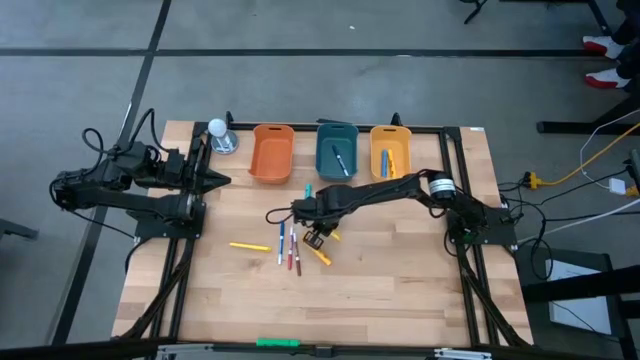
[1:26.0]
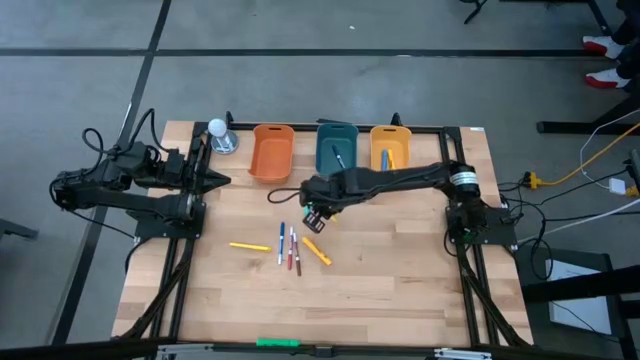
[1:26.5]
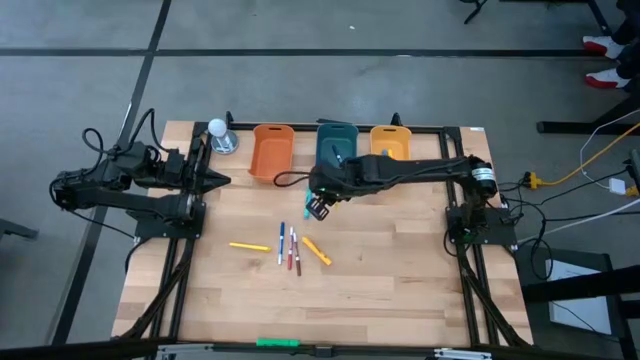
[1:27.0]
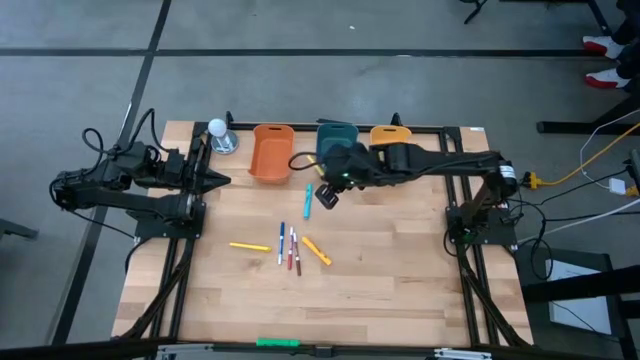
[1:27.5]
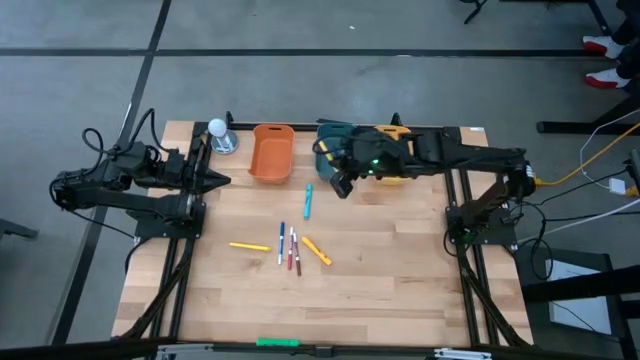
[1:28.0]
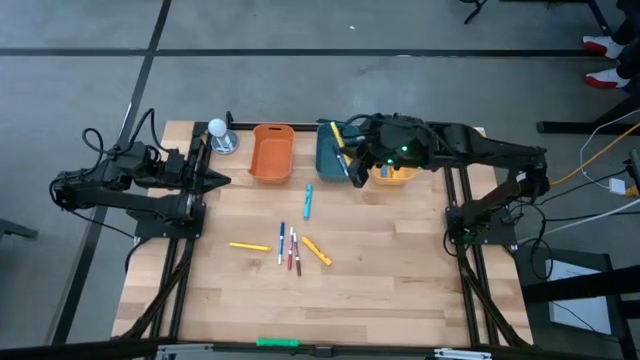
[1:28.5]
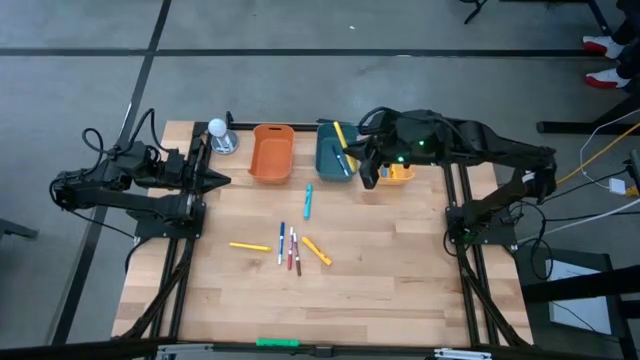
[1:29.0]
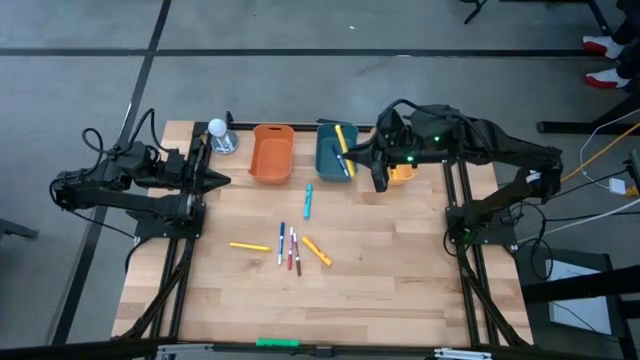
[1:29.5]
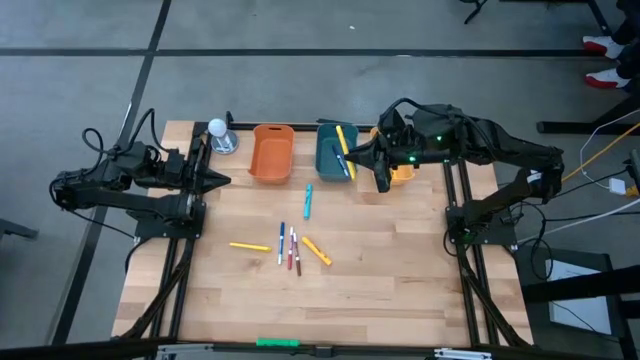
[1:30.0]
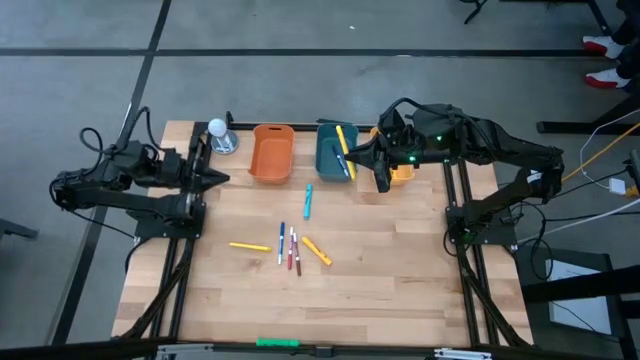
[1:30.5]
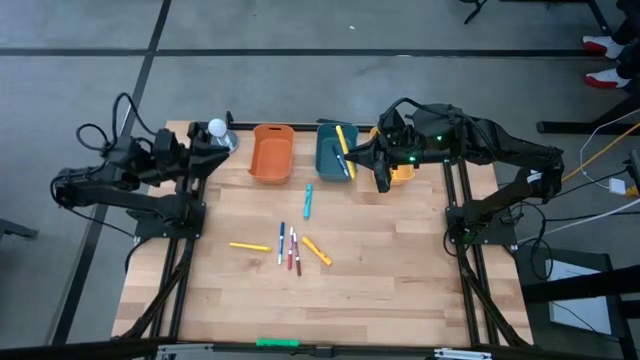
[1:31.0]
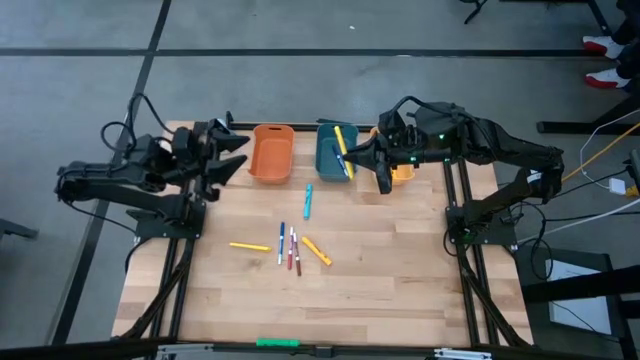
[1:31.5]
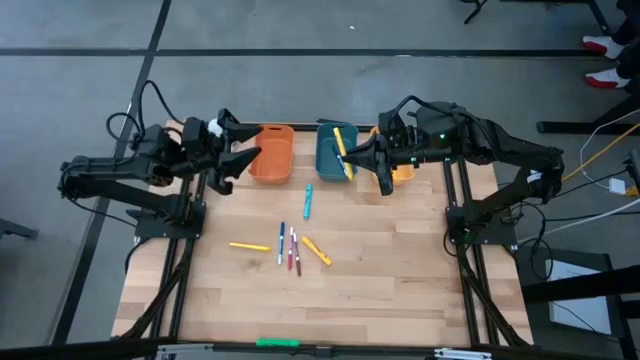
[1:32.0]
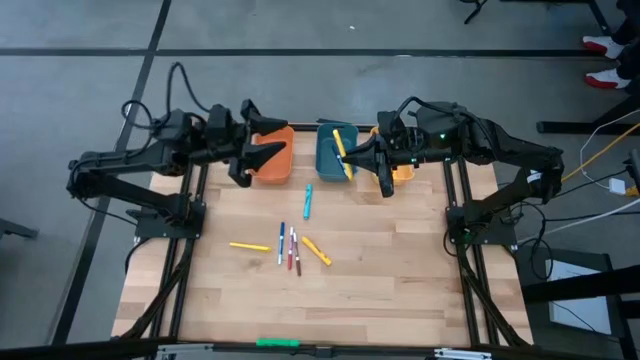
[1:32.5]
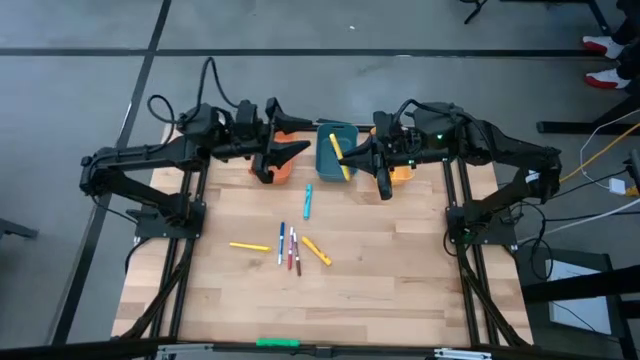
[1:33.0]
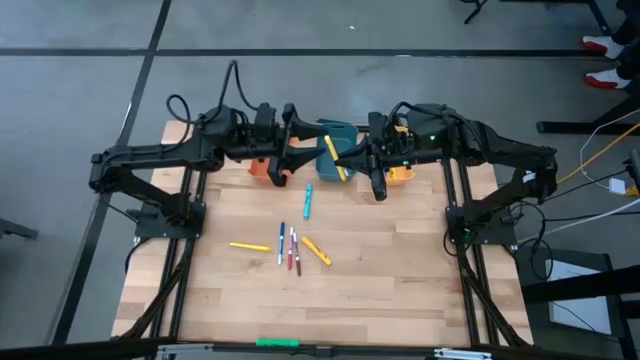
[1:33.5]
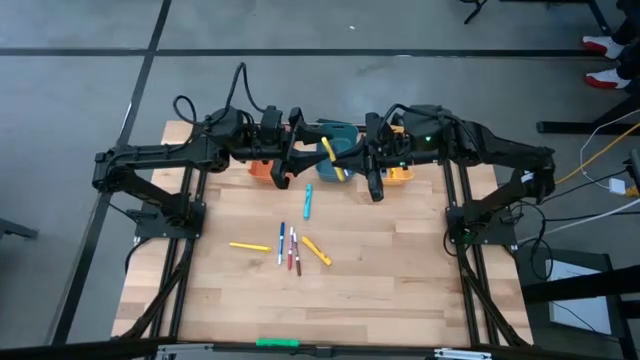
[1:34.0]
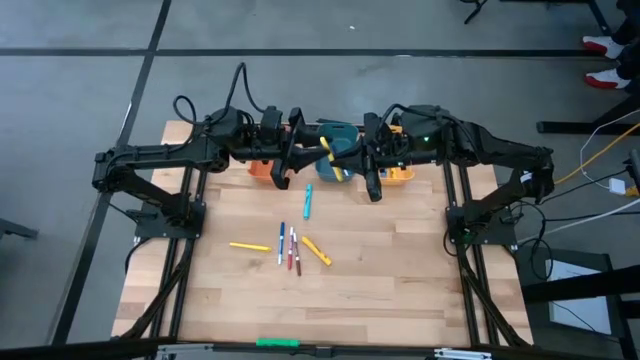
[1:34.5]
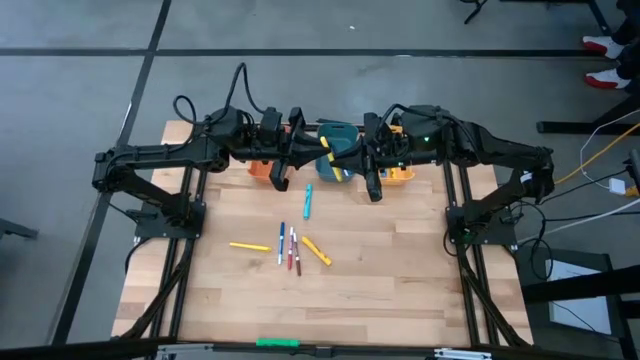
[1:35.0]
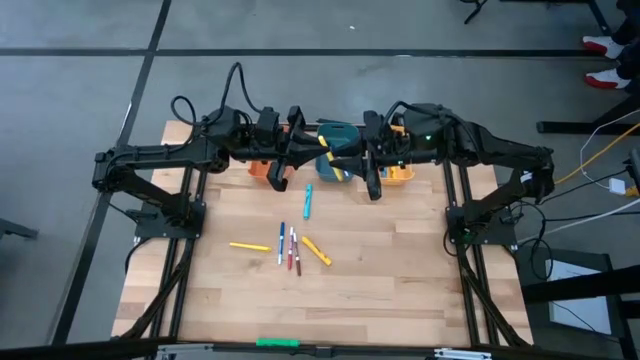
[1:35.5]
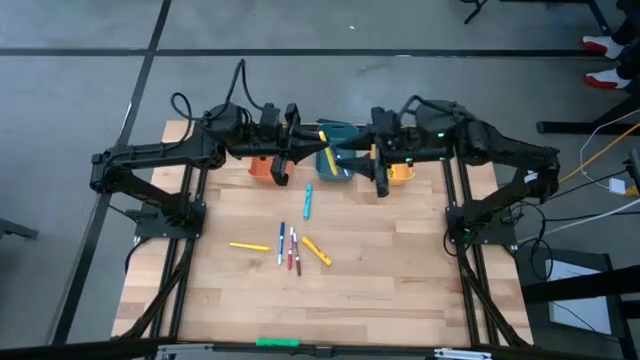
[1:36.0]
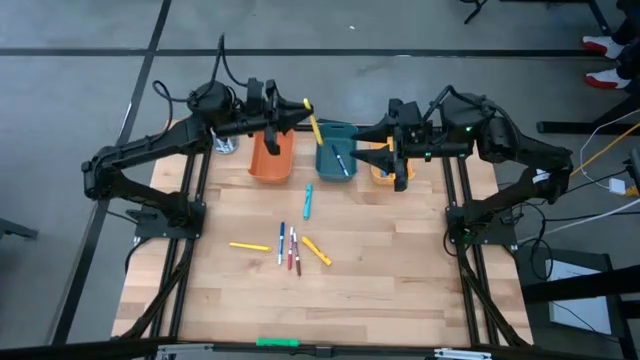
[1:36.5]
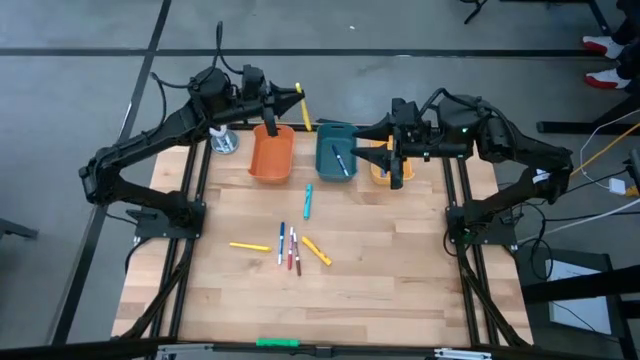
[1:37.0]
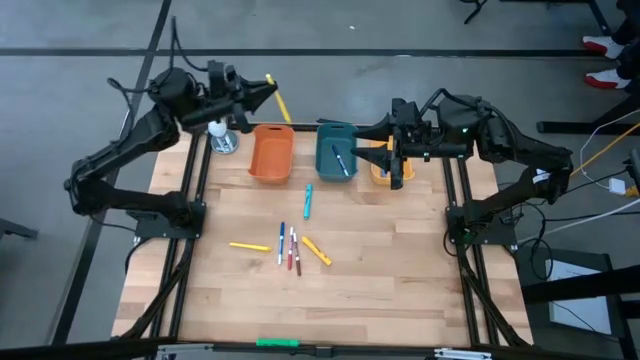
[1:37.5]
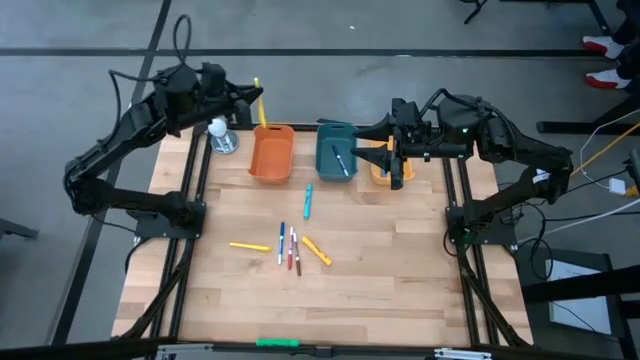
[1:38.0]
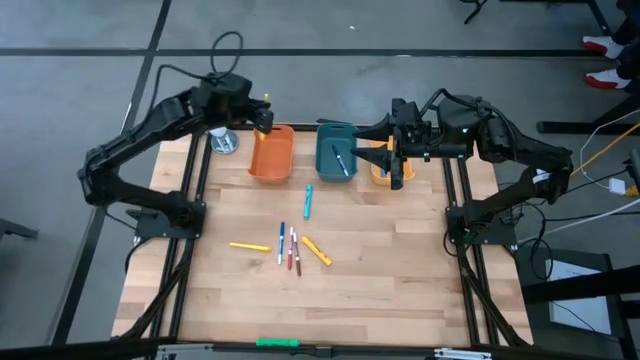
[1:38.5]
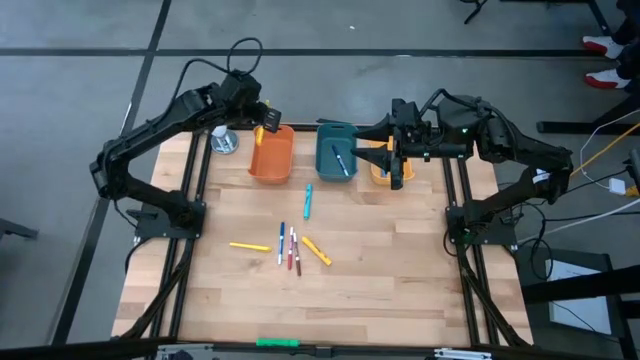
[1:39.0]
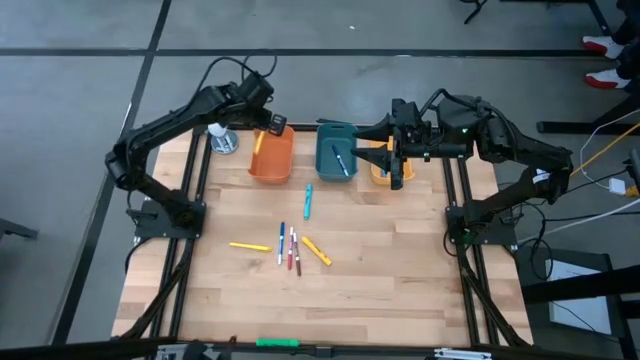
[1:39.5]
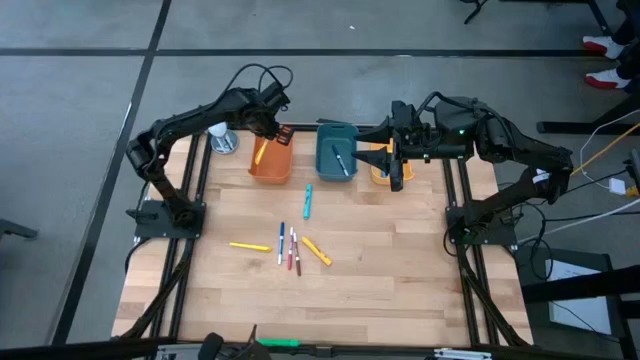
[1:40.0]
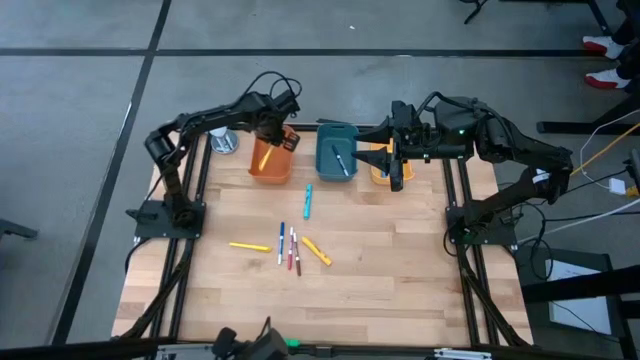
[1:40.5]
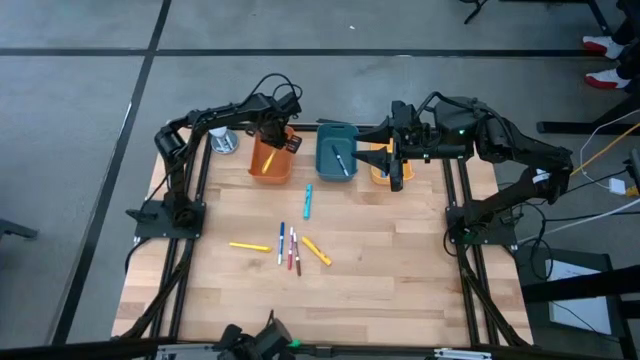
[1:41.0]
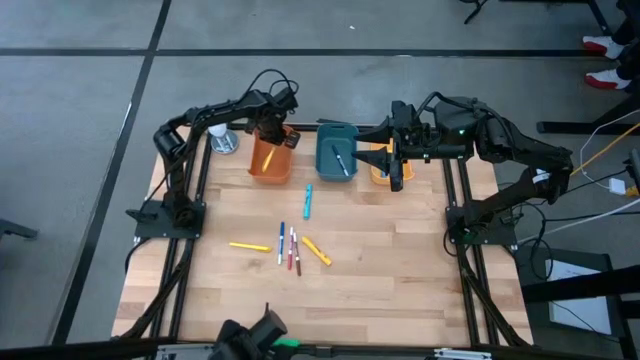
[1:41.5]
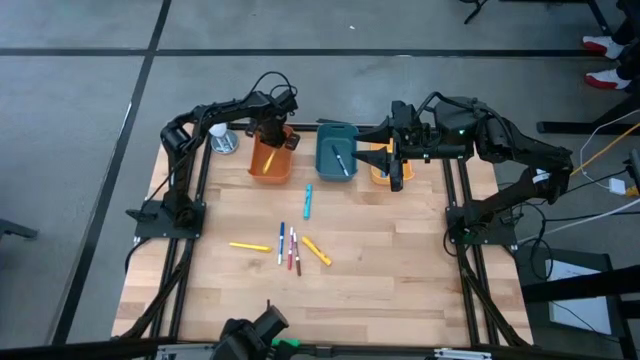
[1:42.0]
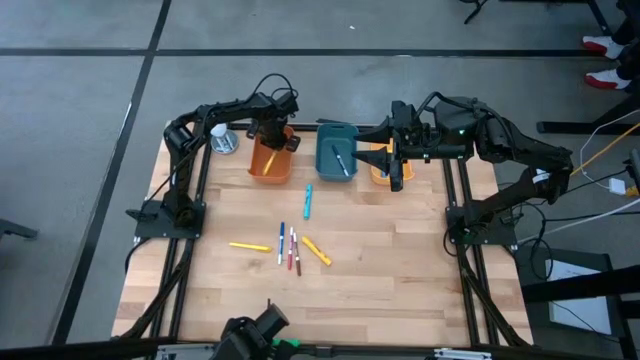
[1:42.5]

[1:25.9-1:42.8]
Task: Pick & Place Markers
Put the right yellow pen into the orange bin

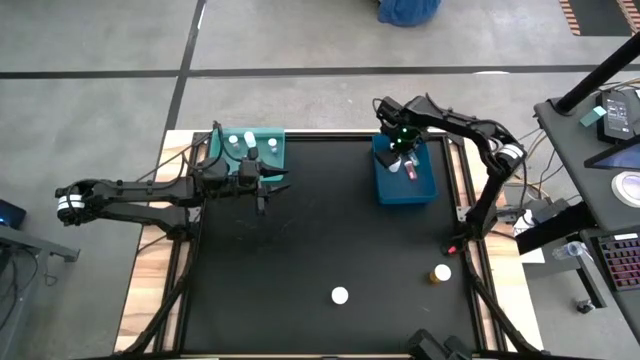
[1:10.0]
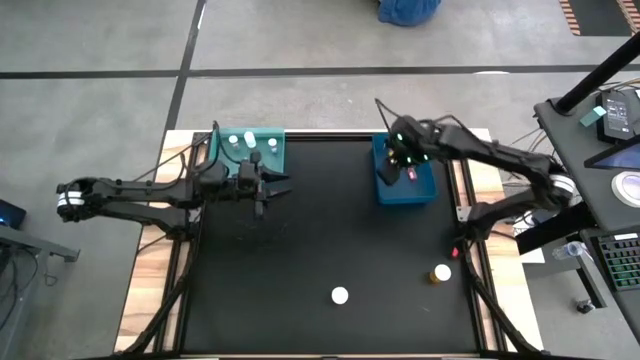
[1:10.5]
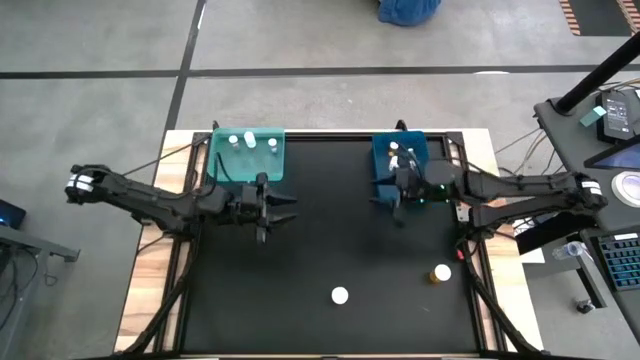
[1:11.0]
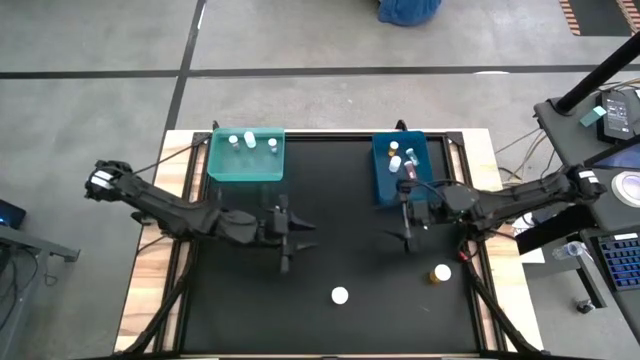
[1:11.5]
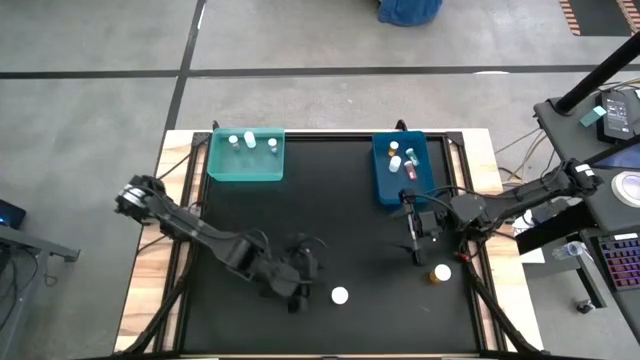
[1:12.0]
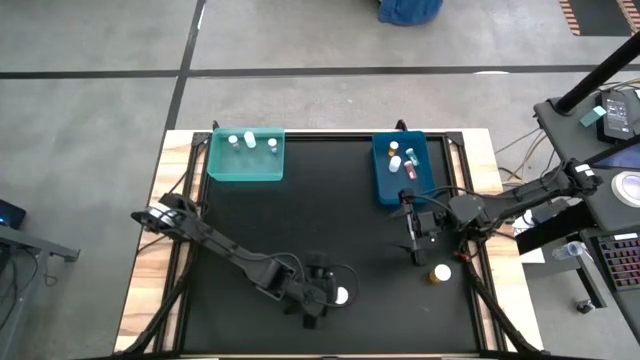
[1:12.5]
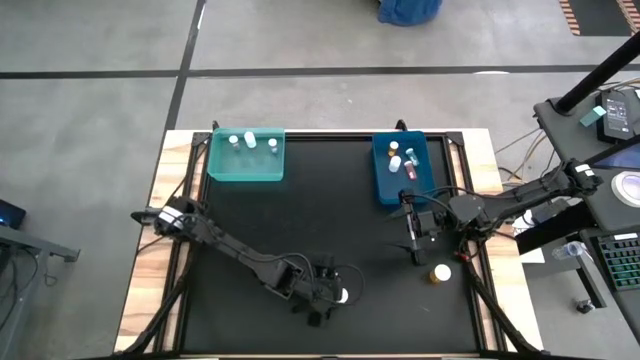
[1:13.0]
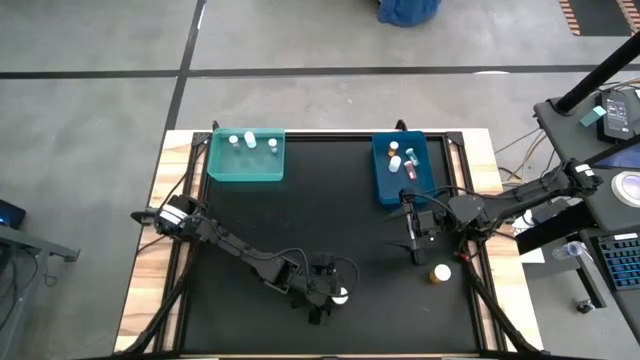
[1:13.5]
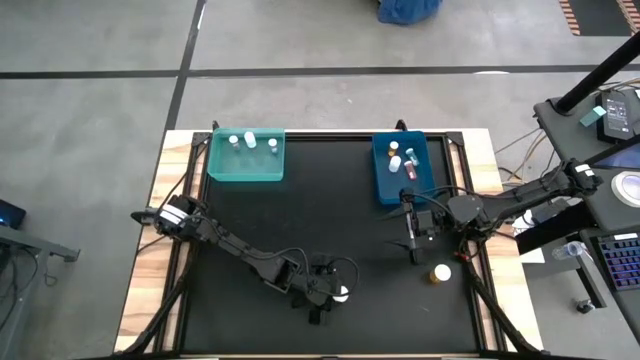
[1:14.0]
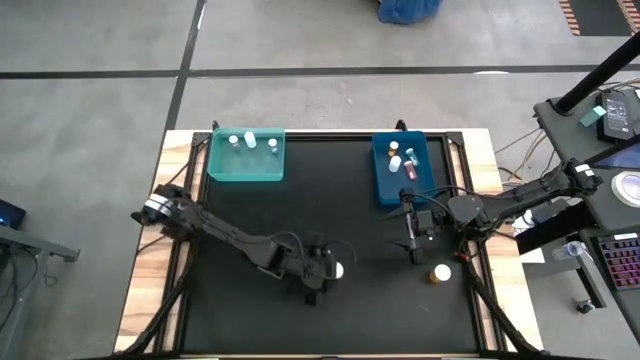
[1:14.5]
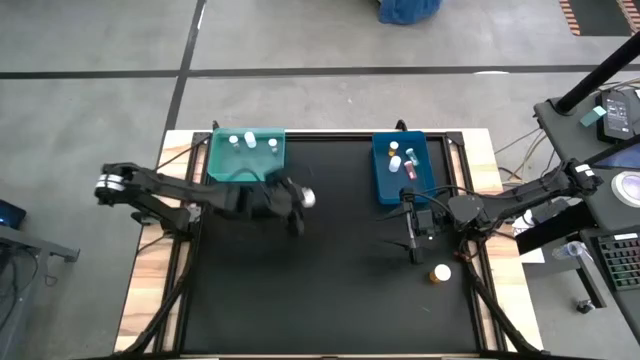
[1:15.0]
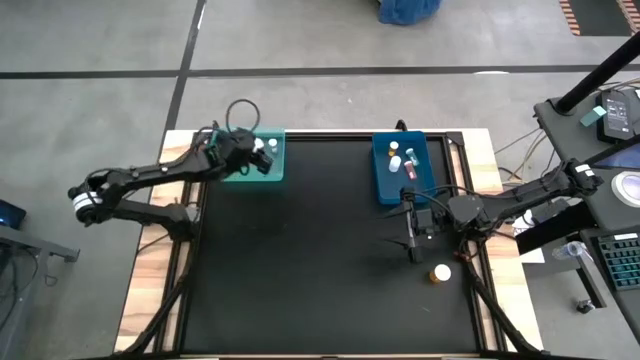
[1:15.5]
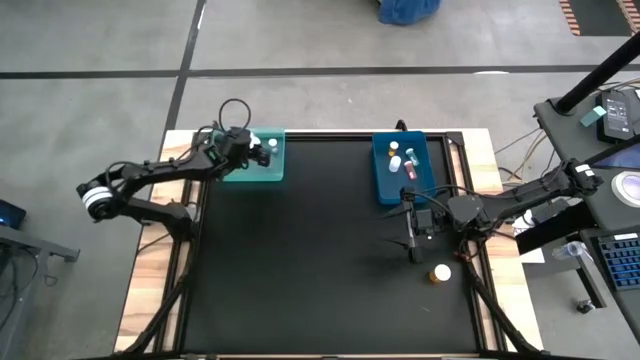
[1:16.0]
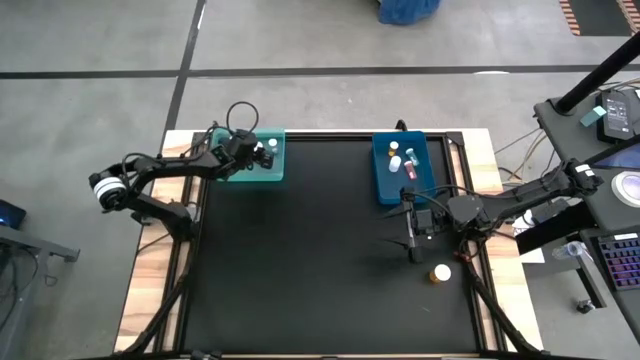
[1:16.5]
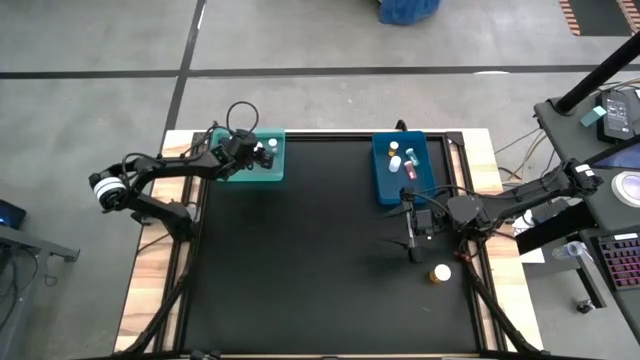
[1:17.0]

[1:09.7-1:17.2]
Task: Pick and place medicine bottles into bin by pill shape (circle, oval)
Put the orange capsule bottle into the light blue bin
